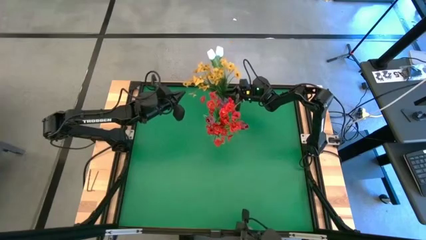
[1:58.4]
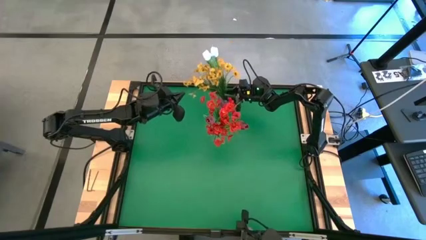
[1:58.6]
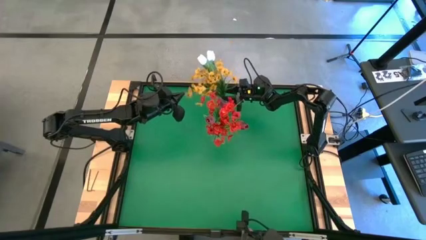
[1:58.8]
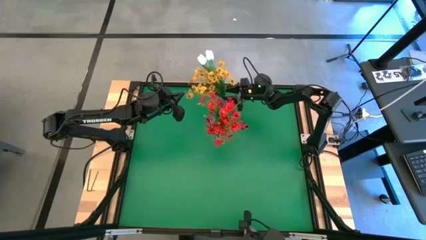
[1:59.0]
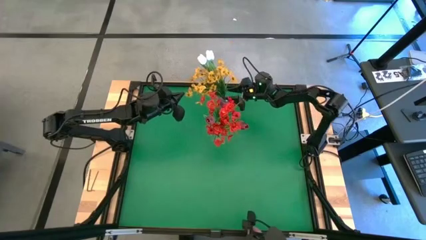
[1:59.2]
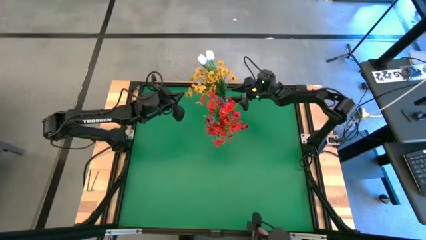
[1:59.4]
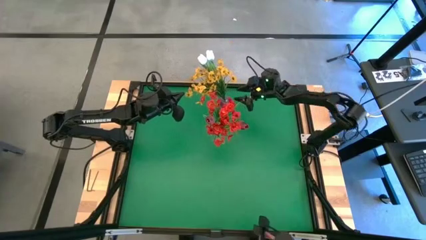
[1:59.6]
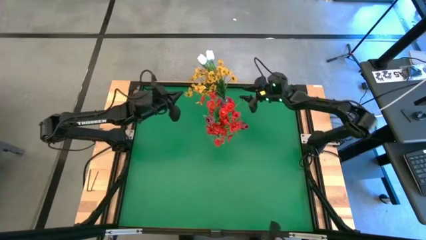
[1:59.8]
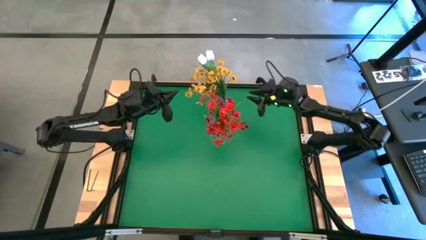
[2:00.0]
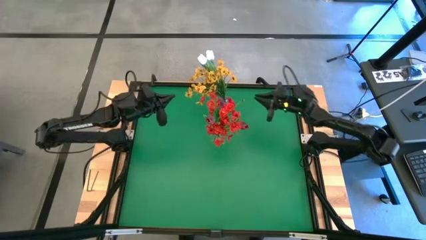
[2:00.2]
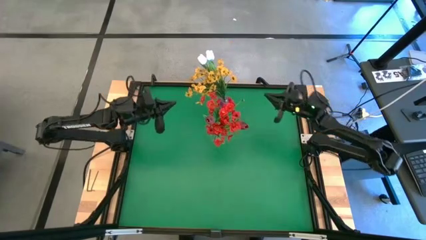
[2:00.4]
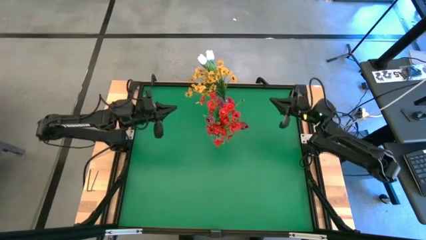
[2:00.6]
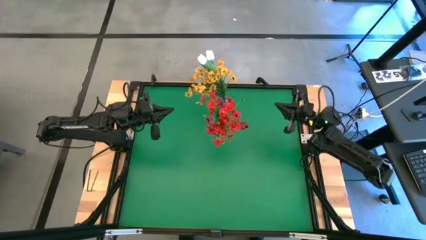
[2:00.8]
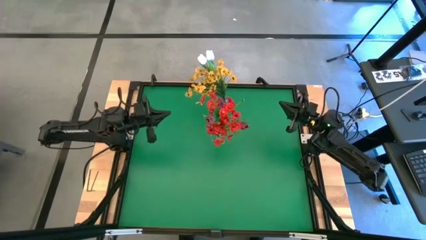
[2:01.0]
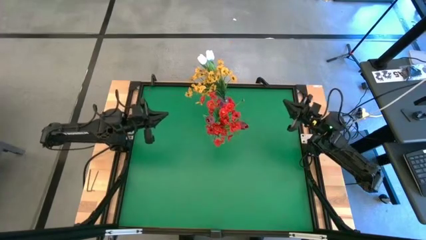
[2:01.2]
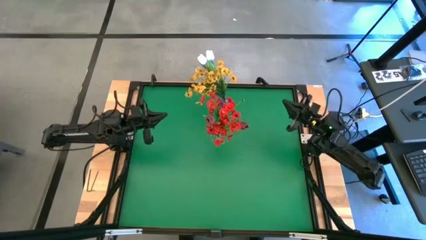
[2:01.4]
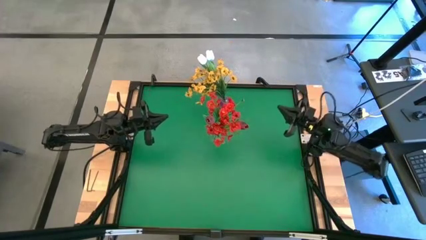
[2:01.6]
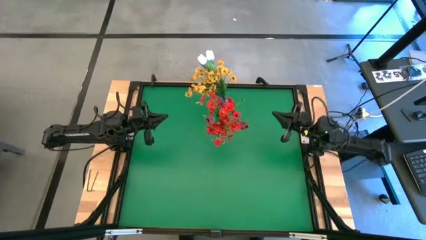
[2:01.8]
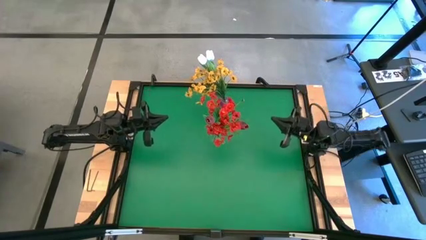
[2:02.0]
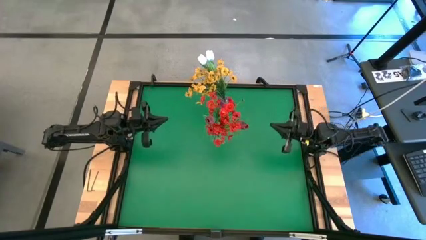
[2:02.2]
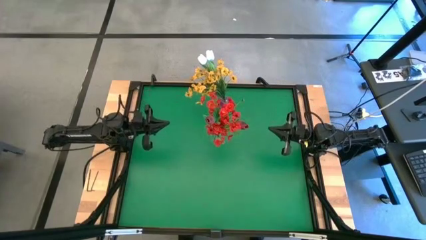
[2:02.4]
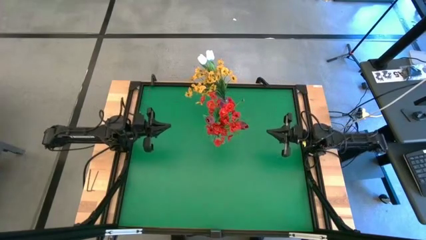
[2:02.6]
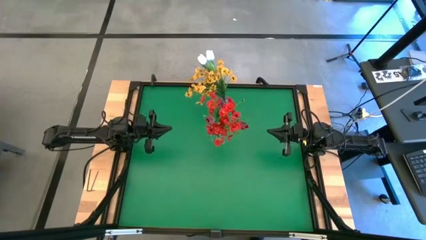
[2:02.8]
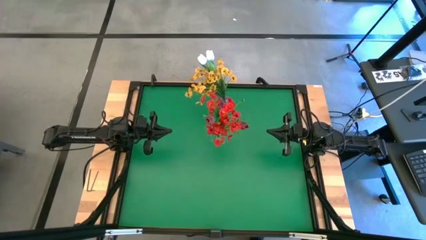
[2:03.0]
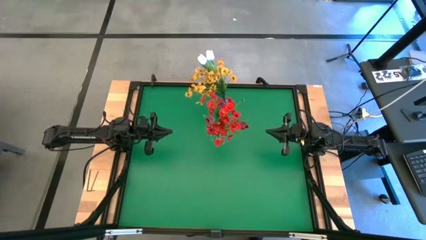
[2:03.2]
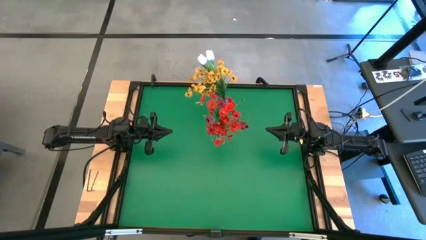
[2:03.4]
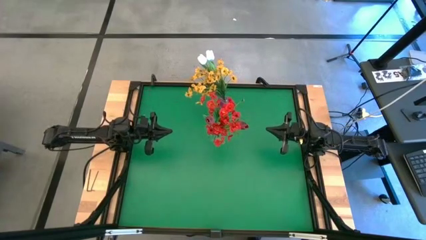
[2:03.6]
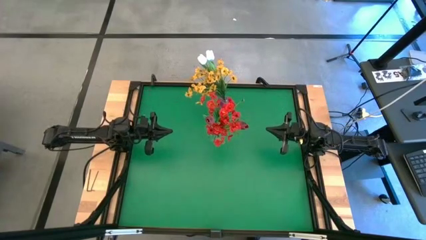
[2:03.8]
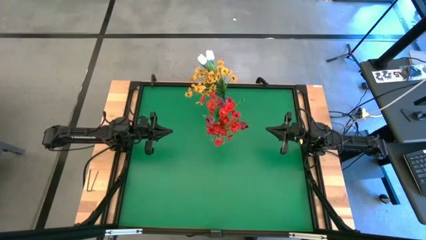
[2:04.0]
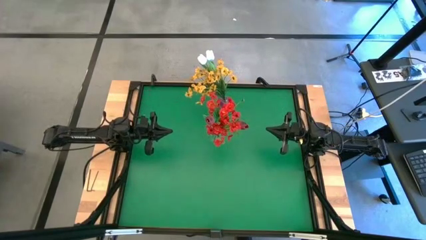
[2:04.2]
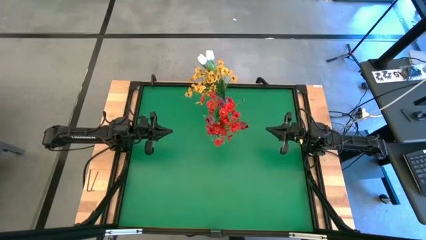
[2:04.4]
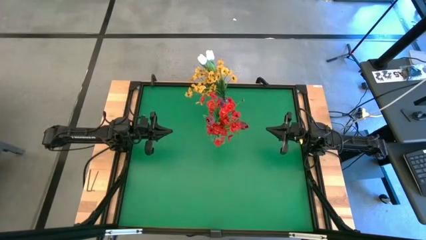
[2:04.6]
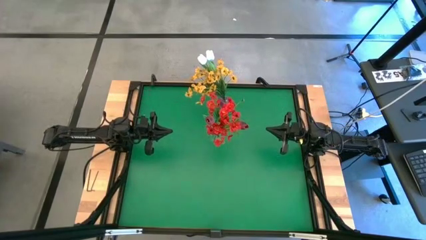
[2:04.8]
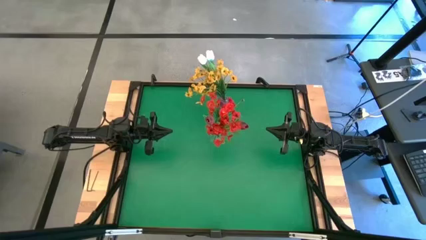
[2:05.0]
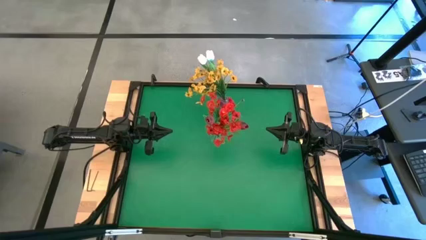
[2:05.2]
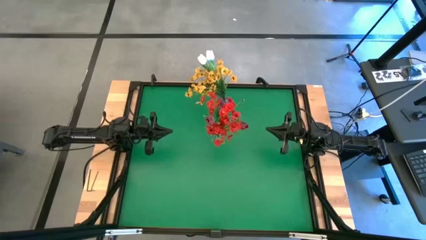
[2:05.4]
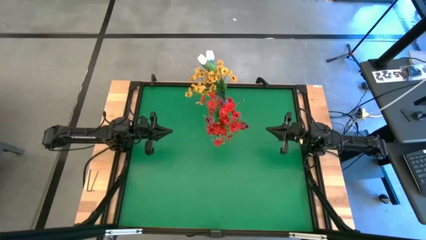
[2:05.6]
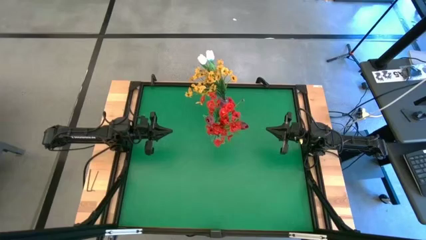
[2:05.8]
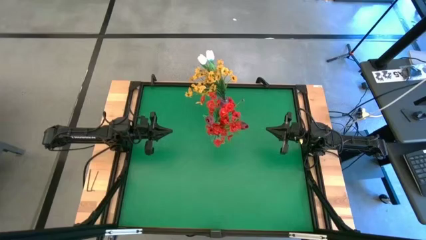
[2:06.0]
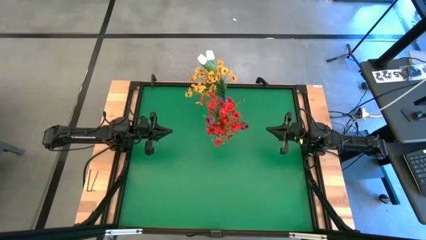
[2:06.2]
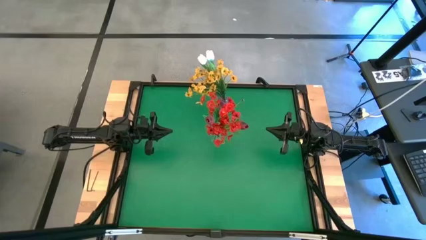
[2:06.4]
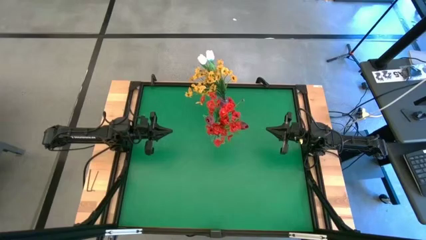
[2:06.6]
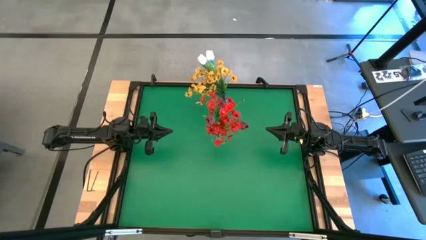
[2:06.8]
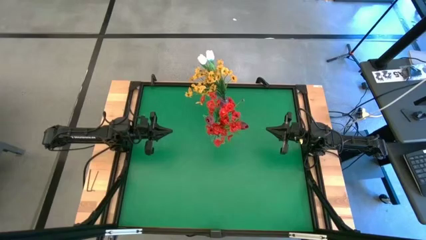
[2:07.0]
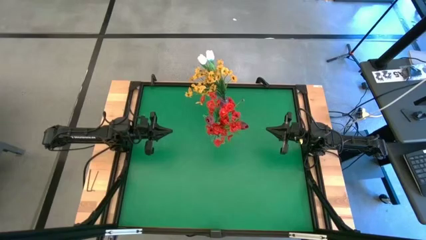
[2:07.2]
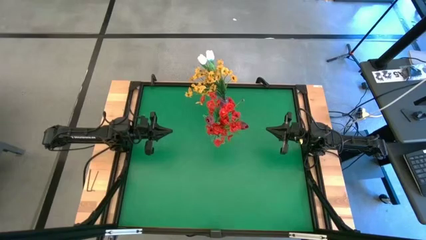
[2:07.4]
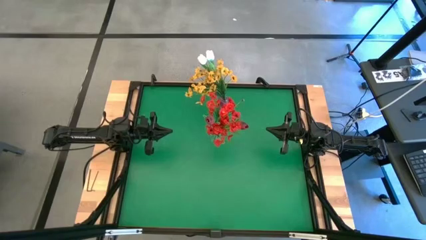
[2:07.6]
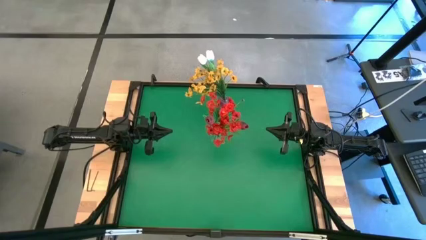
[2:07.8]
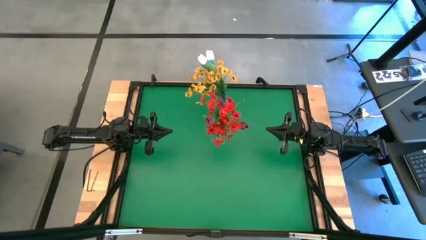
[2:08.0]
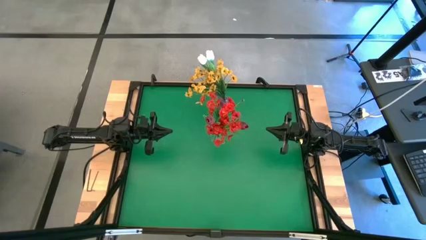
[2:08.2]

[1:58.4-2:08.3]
Task: Sort flowers into vase by color
Return to Home Position

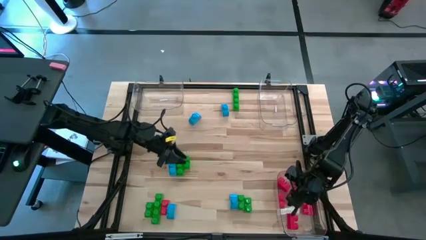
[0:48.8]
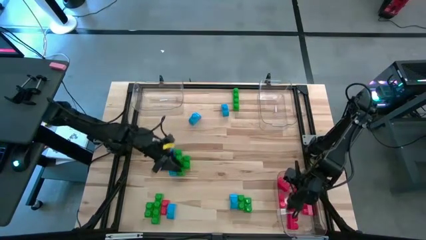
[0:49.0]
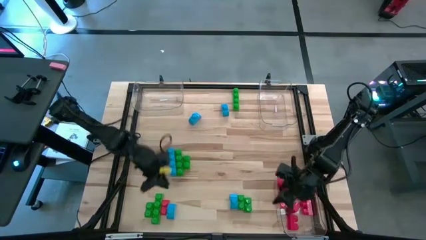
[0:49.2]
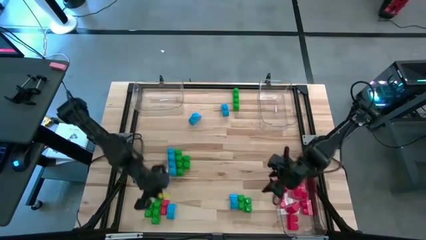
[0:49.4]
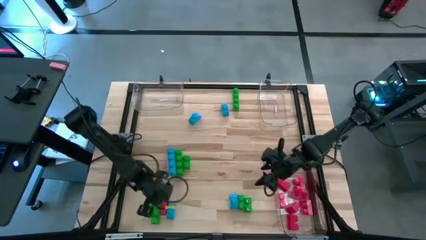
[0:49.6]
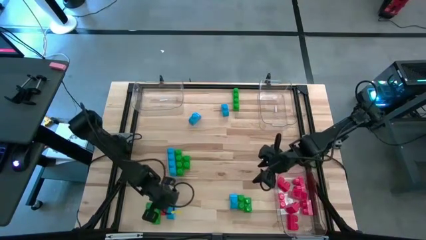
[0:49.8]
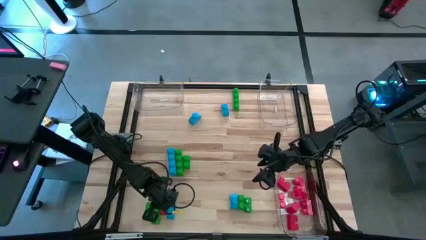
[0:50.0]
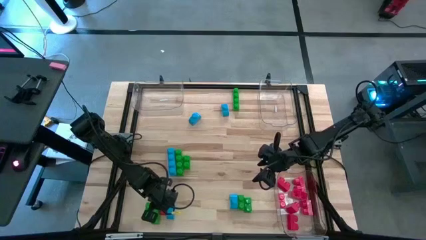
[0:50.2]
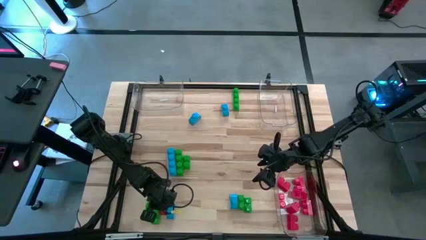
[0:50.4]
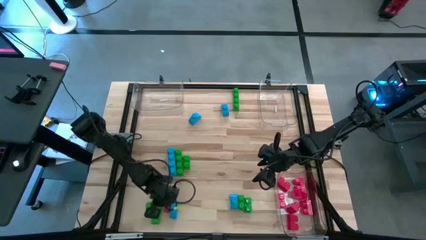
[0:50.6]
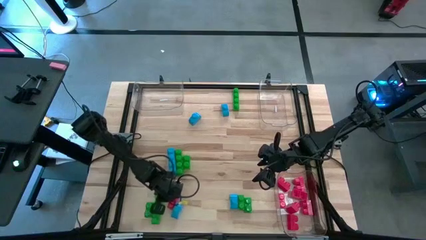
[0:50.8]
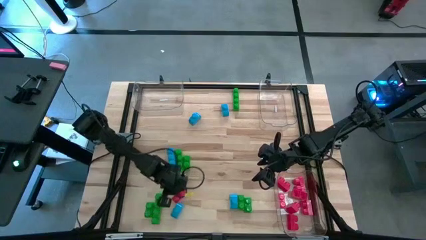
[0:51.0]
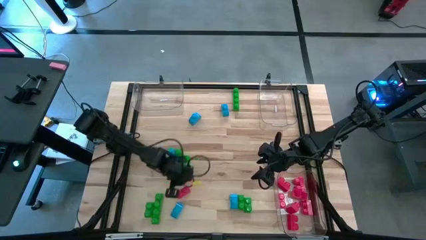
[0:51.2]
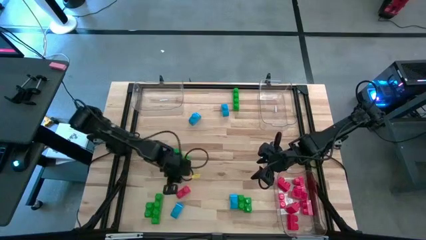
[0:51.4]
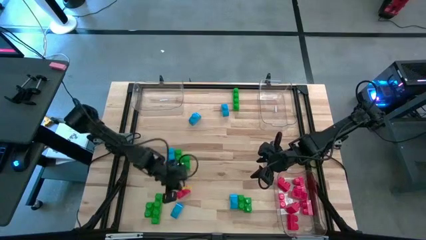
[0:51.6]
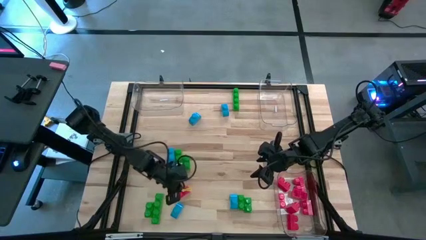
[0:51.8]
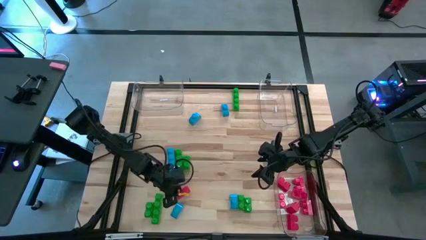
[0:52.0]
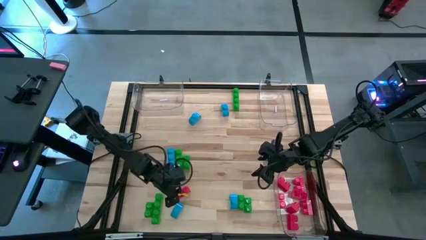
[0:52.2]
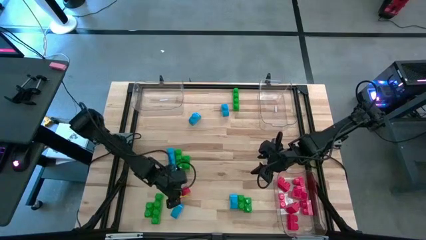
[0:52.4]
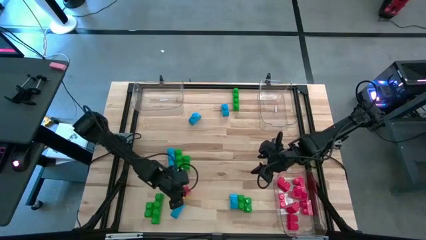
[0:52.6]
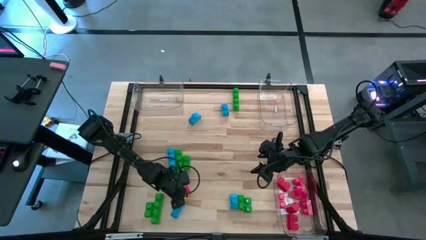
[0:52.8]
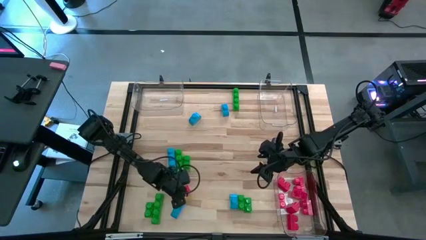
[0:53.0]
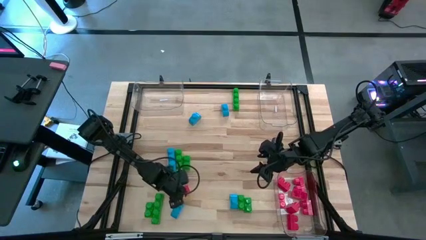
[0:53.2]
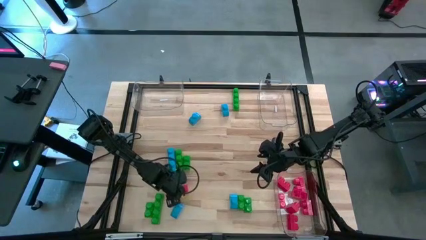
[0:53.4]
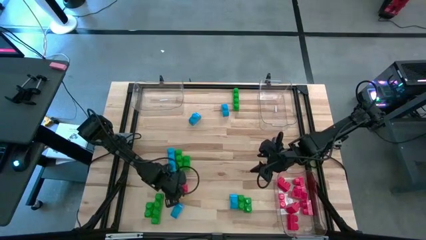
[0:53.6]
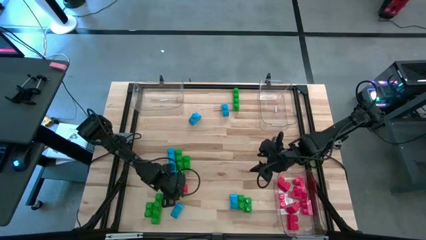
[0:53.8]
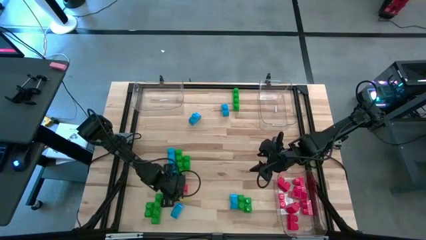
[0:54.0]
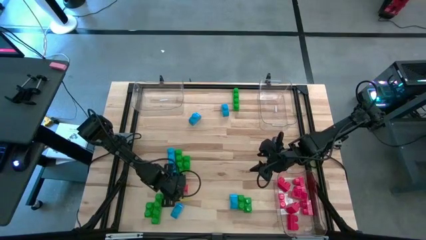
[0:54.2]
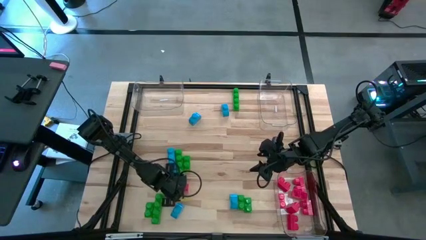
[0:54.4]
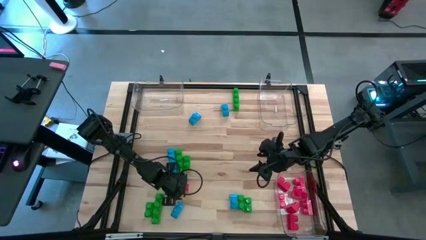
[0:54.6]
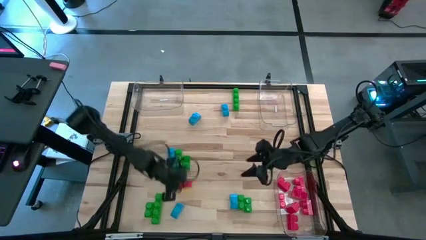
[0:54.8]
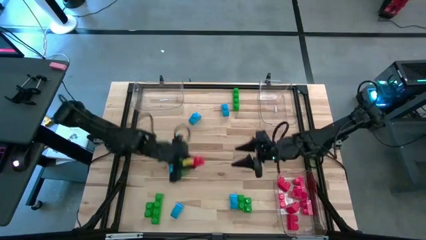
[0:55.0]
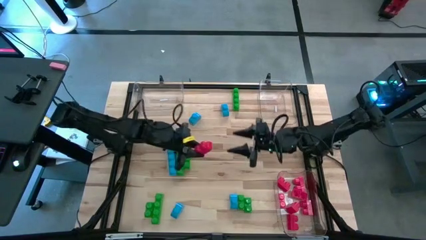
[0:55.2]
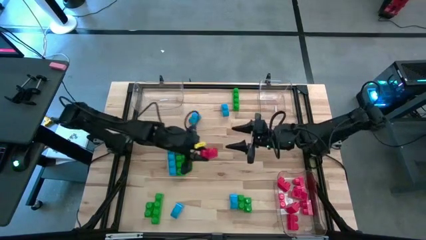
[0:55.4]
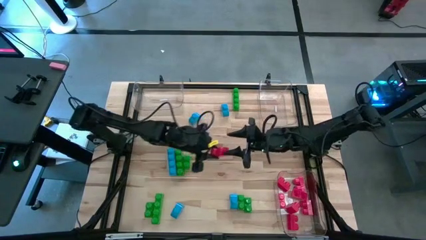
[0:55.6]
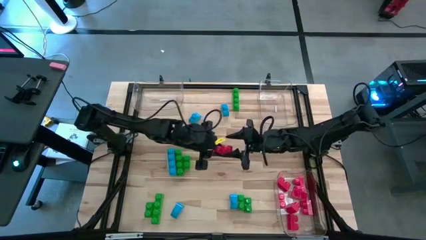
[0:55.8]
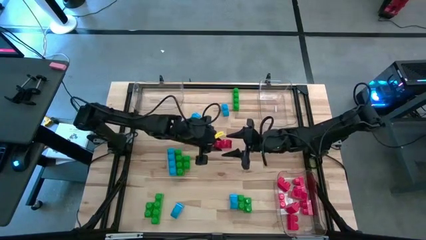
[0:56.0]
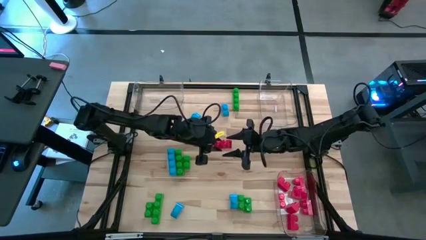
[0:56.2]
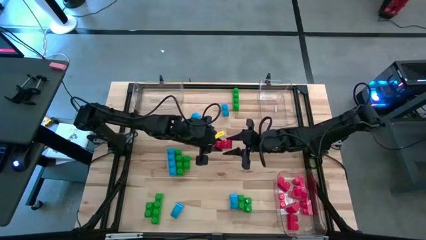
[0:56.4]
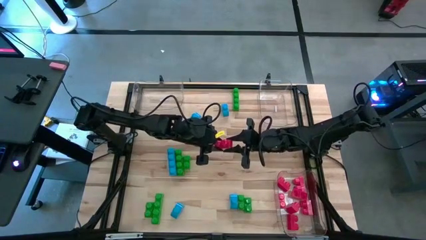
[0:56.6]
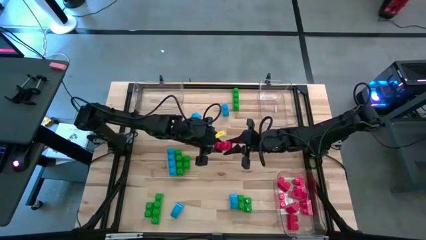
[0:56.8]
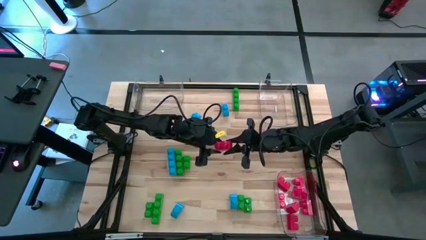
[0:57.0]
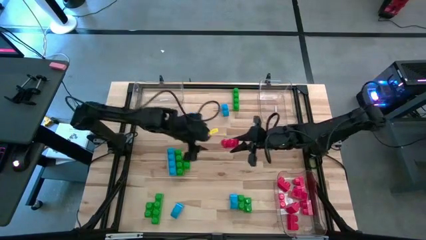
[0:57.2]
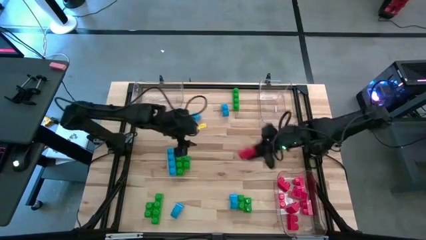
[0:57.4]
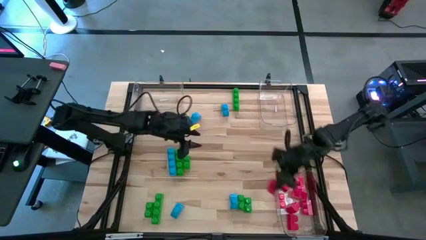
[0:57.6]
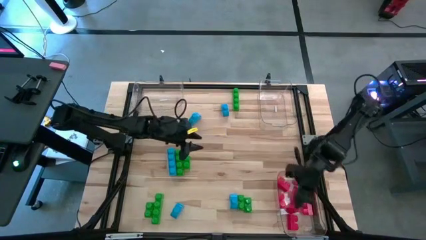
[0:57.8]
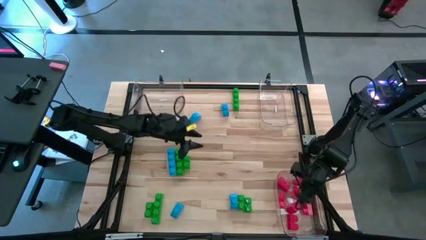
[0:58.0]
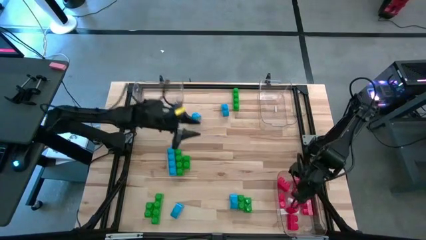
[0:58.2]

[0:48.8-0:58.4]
Task: Sort blocks
Put the red game piece into the bottom right transparent bin
